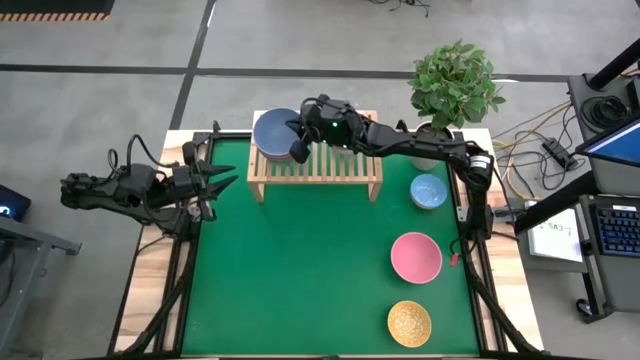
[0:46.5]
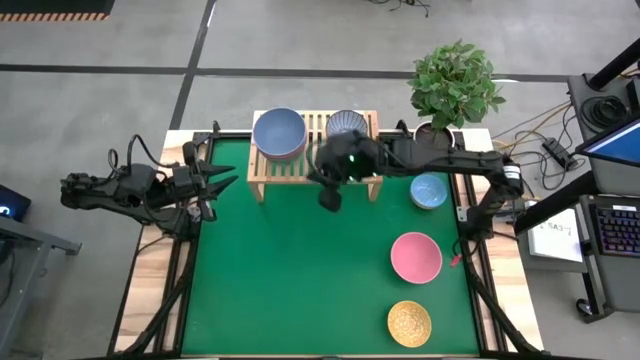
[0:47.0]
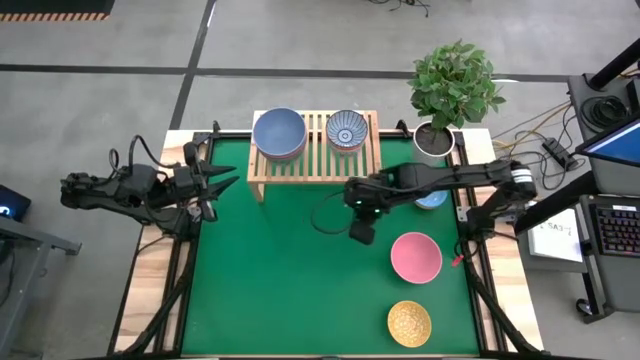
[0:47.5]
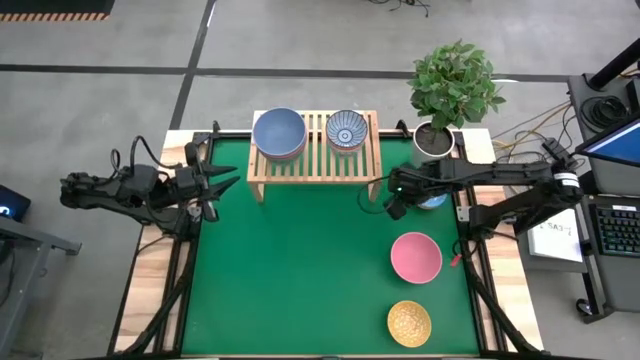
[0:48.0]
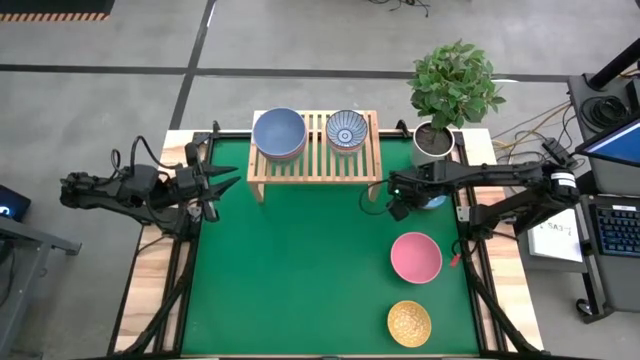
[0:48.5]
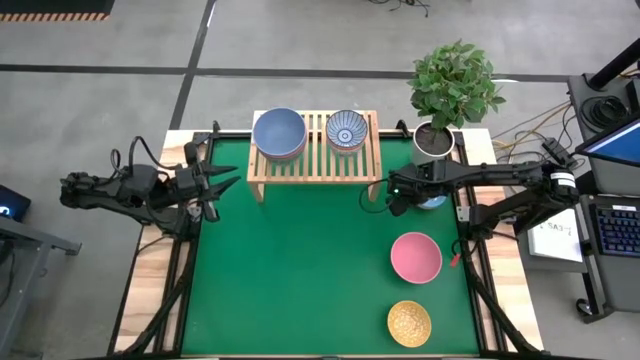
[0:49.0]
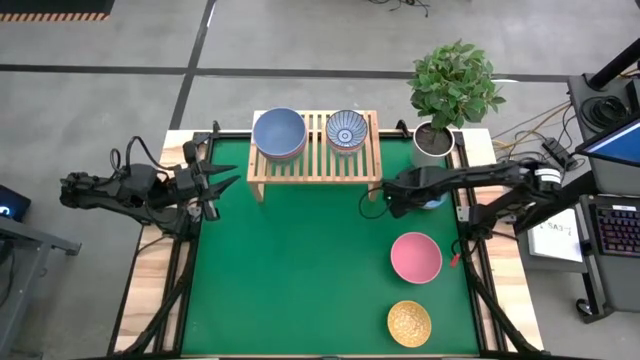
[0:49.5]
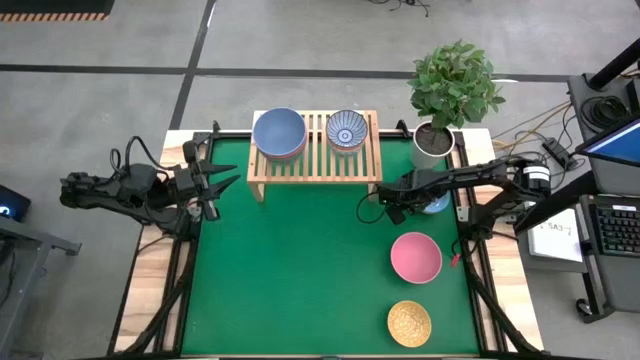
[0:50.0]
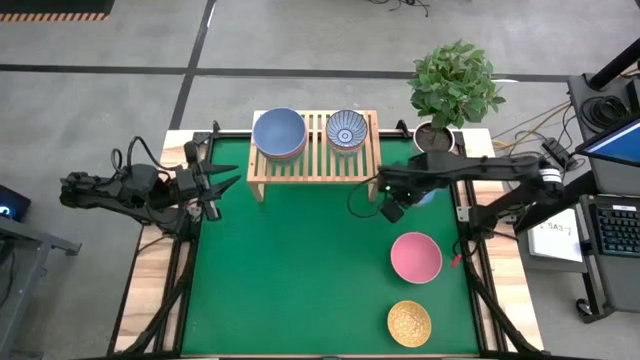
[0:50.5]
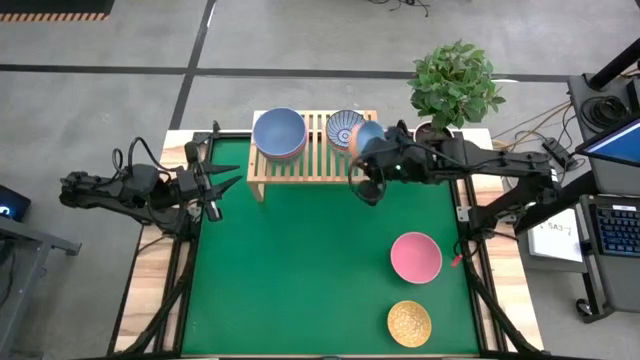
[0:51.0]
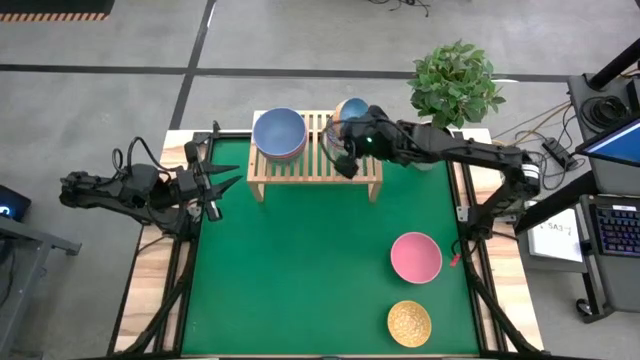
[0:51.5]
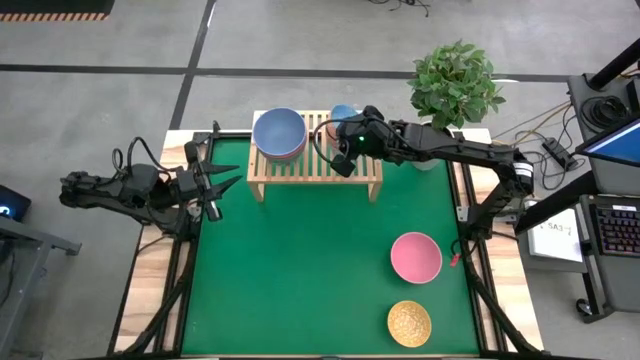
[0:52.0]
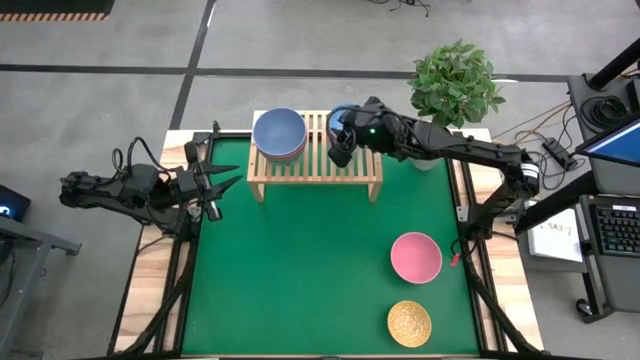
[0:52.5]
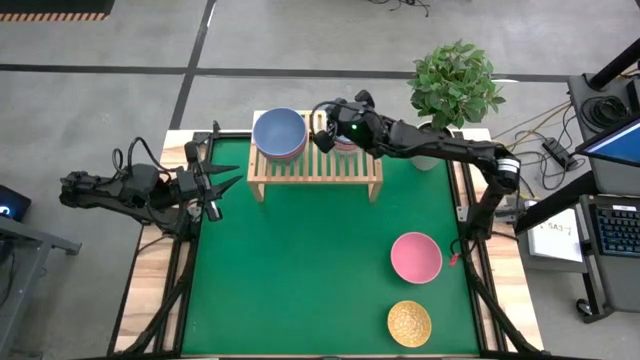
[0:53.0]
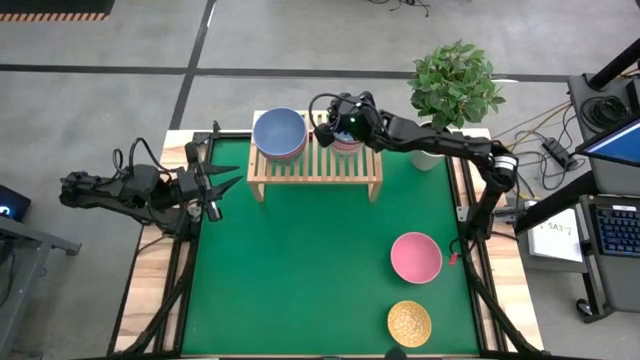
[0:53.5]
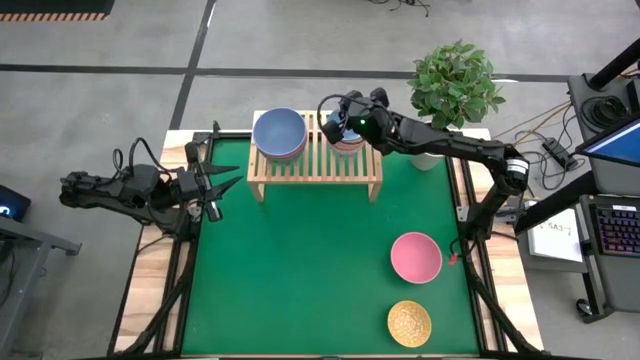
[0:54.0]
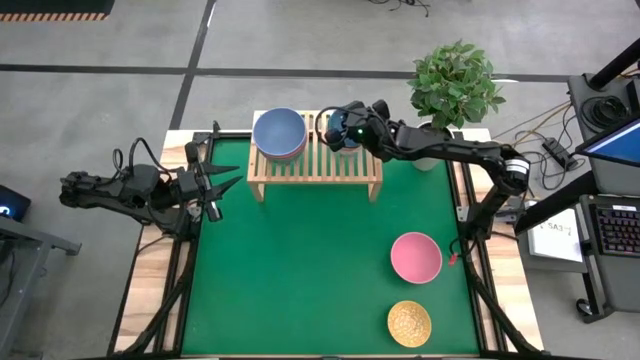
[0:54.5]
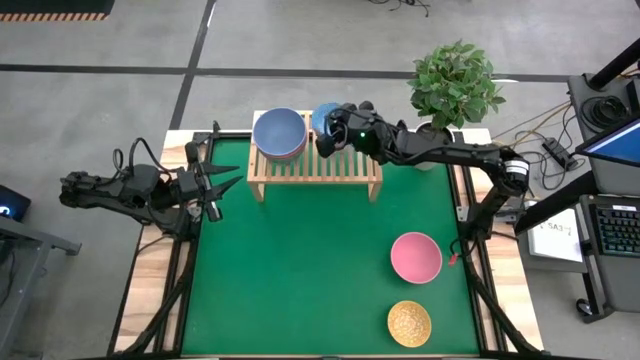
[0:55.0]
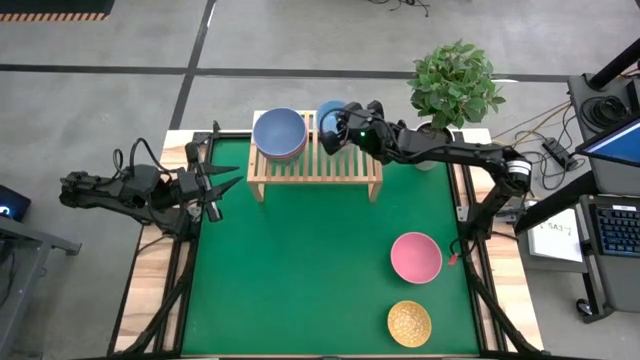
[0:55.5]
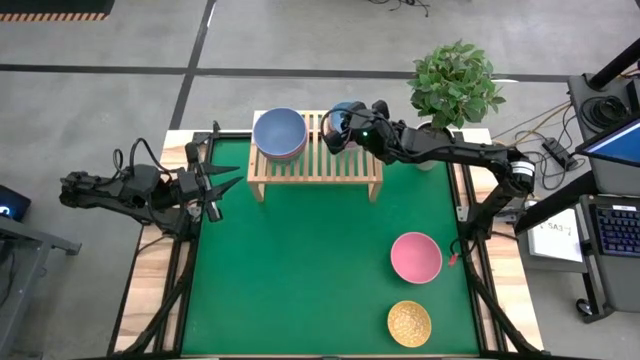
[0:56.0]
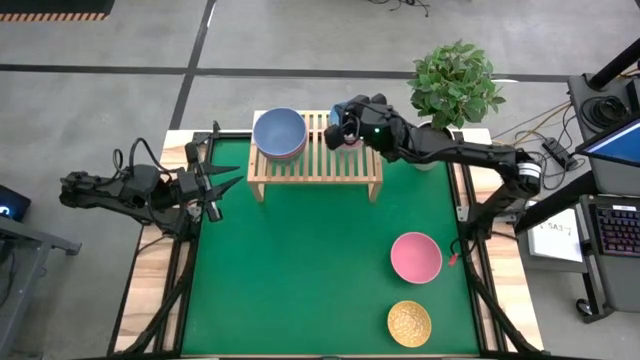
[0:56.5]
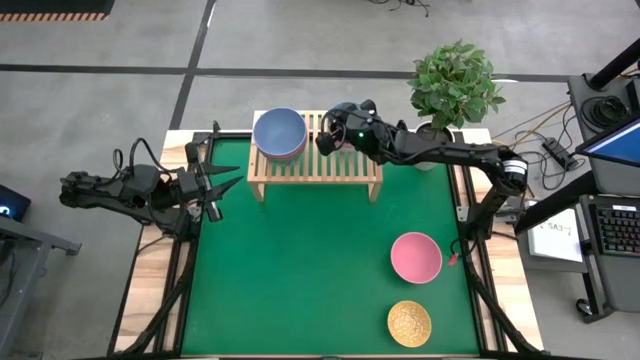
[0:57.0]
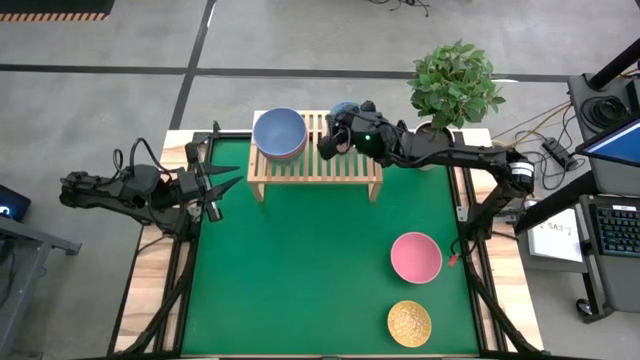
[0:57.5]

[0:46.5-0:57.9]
Task: Place and stack bowls onto a shelf
Stack the small blue bowl on the small blue patterned bowl on the shelf

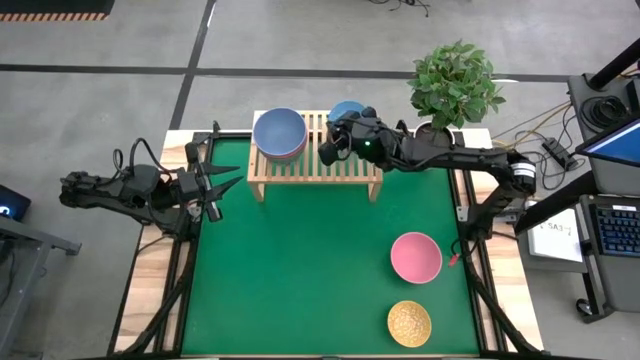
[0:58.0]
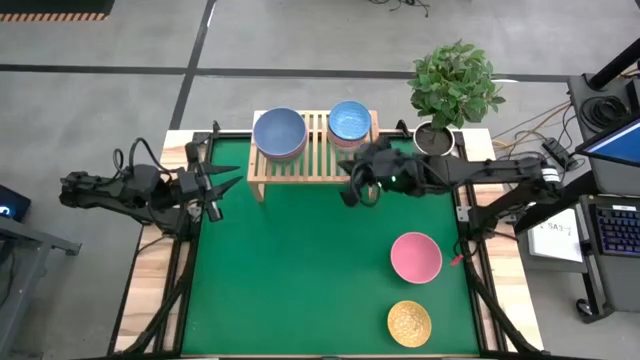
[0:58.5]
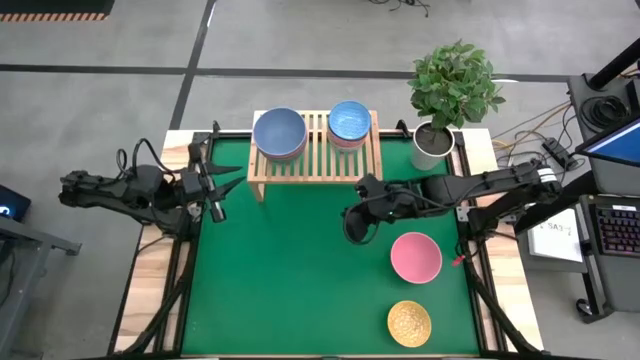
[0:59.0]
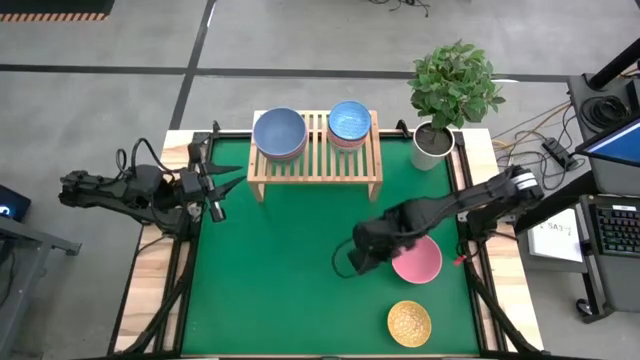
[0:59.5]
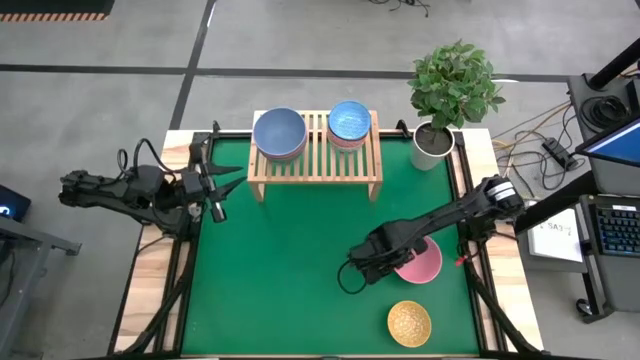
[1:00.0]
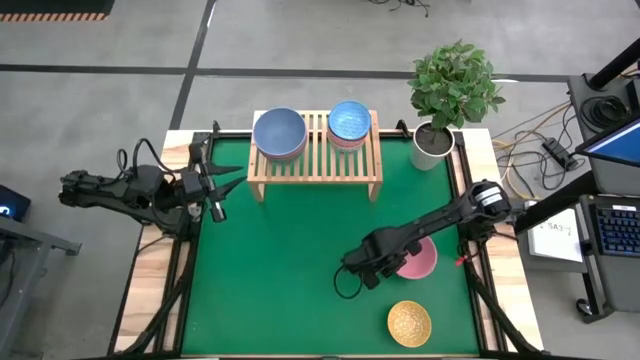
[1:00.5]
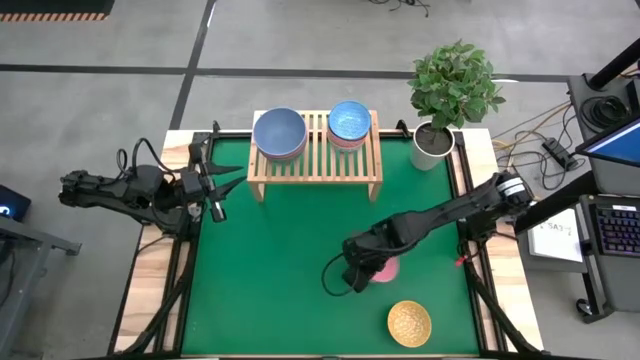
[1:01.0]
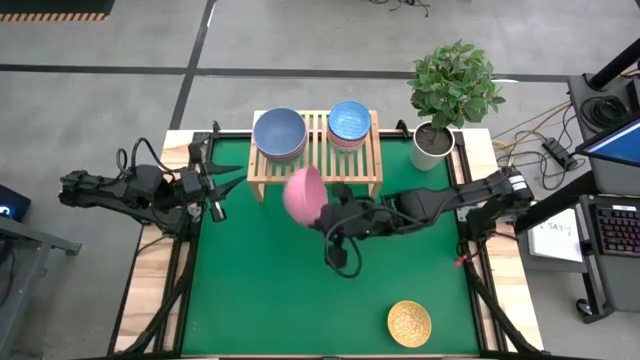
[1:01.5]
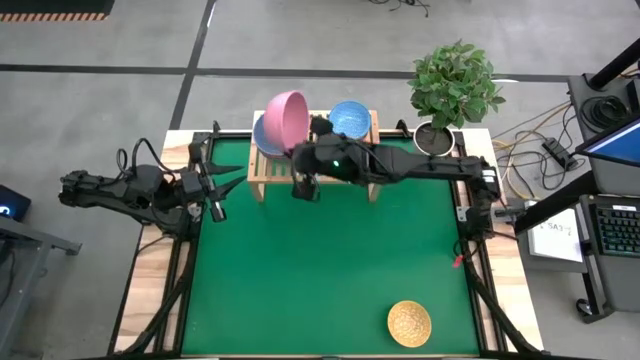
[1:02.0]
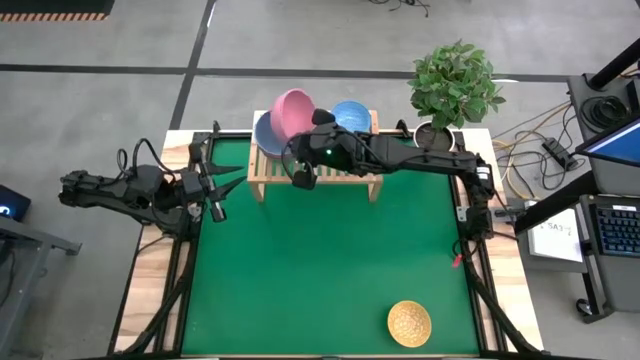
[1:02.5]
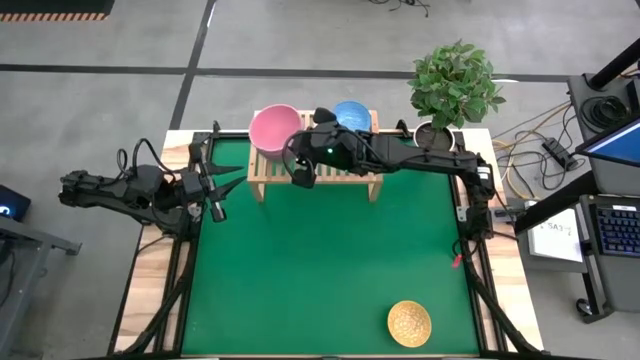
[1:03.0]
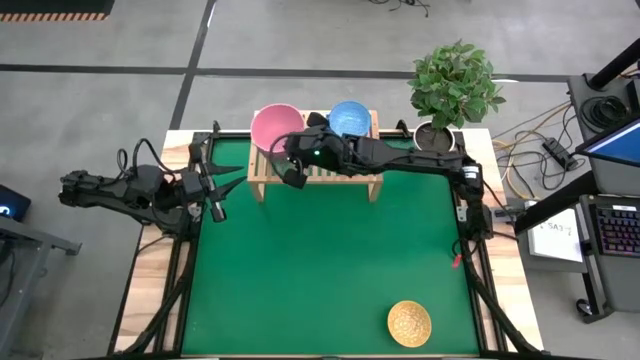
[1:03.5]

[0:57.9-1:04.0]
Stack the large pink bowl on the large gray bowl on the shelf

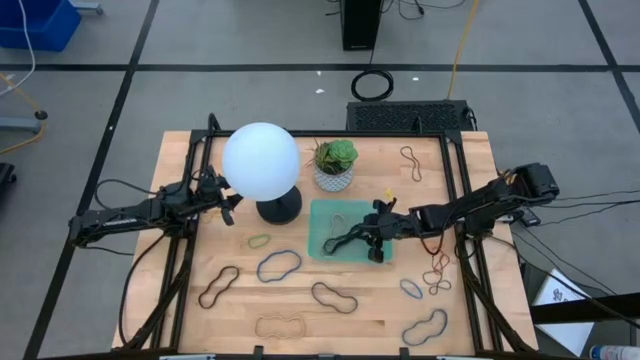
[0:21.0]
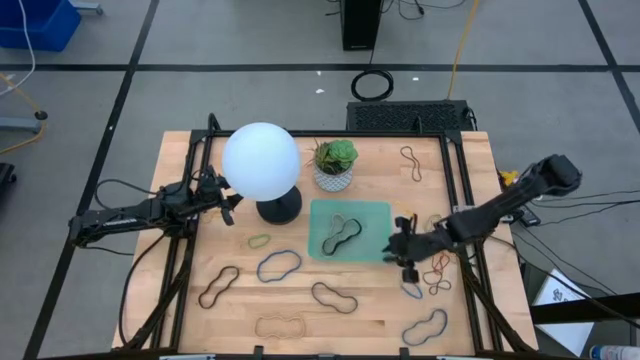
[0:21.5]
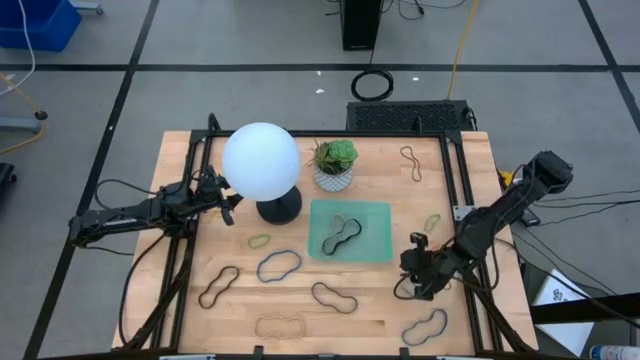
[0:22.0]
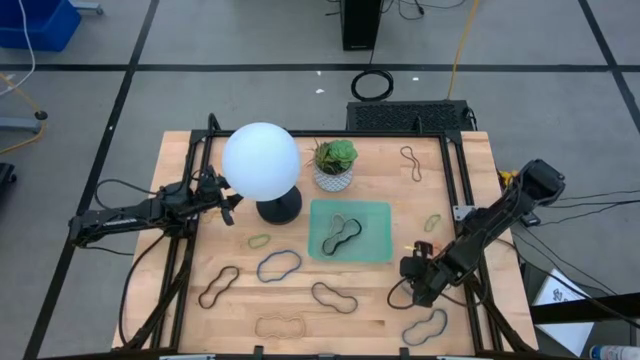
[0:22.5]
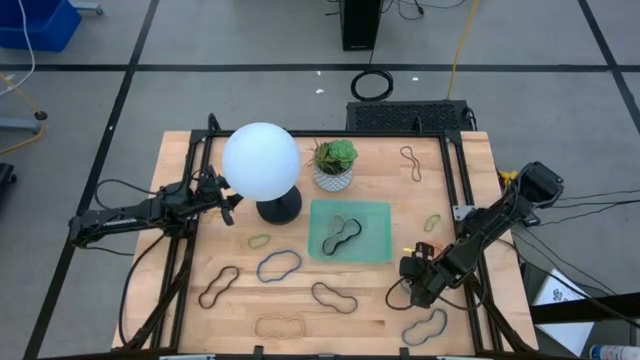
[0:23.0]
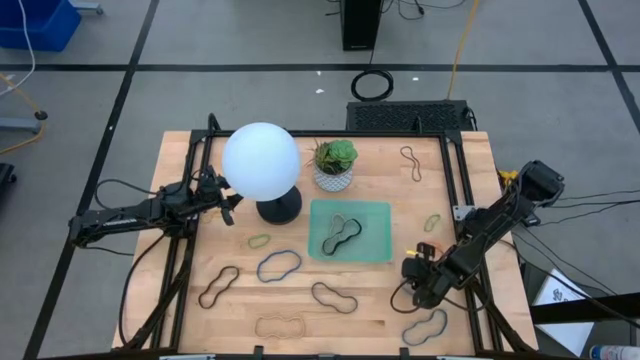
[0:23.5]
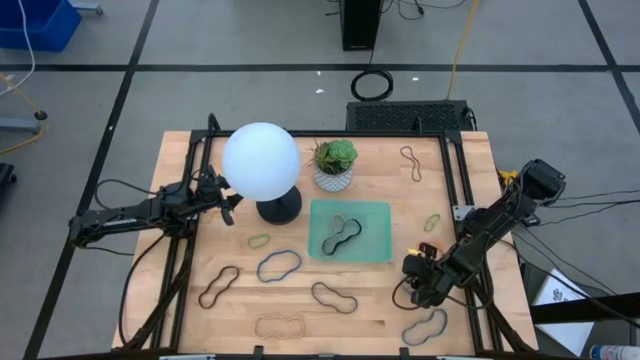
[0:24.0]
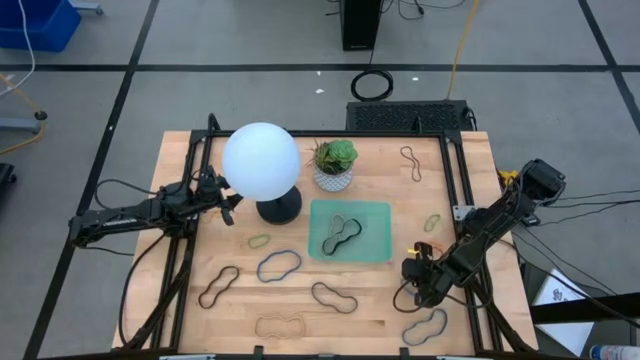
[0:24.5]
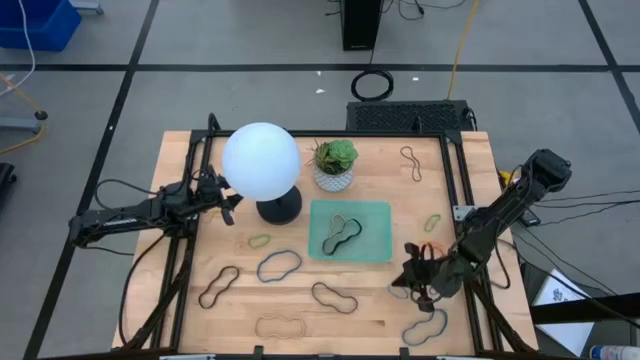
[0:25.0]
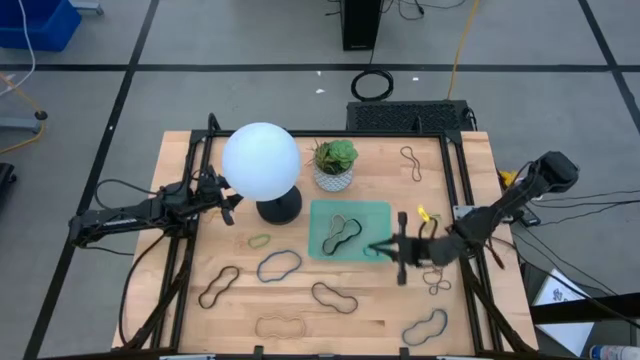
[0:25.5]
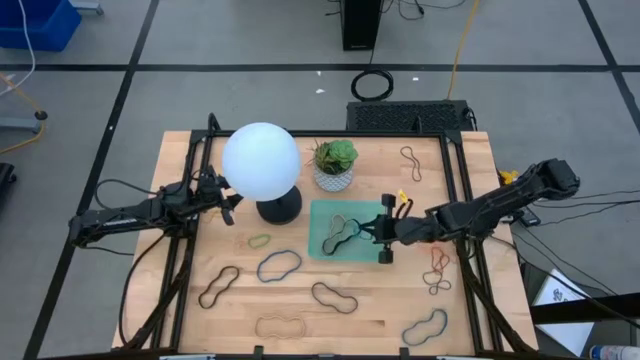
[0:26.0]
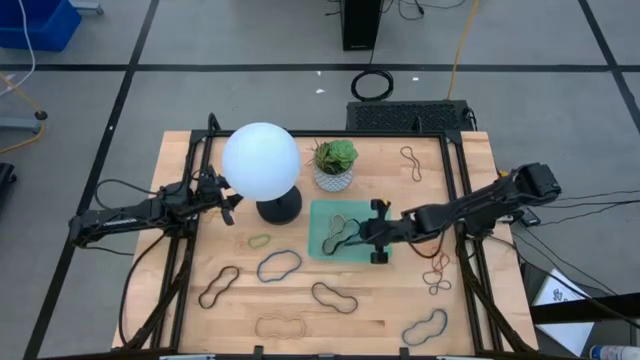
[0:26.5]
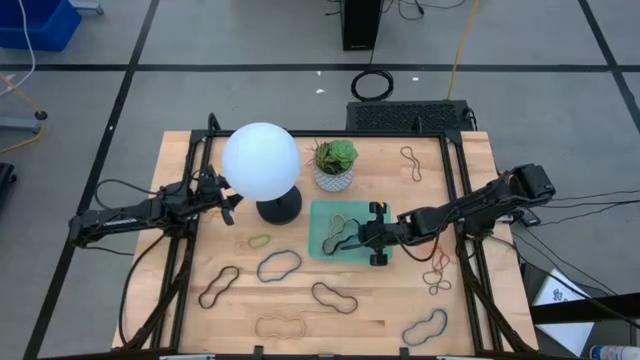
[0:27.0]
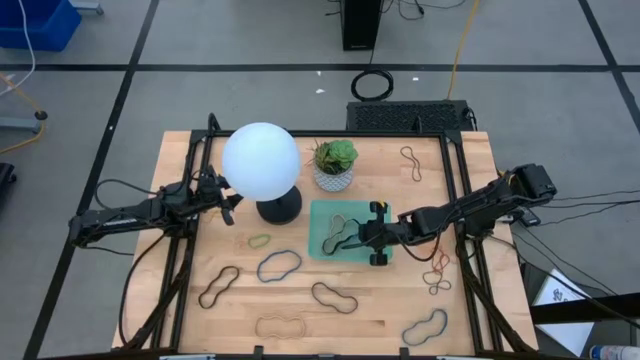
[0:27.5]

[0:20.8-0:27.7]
Task: Pick and place rubber bands into bin
Put the top right blue rubber band into the blue bin
